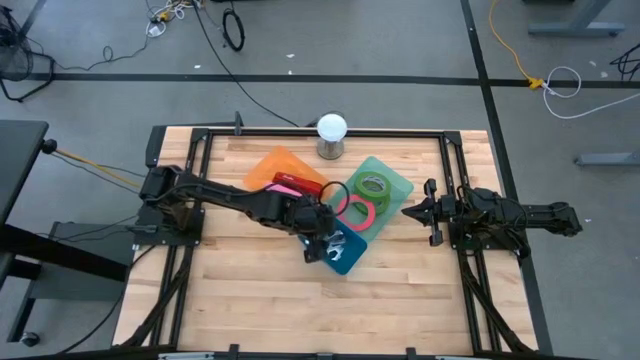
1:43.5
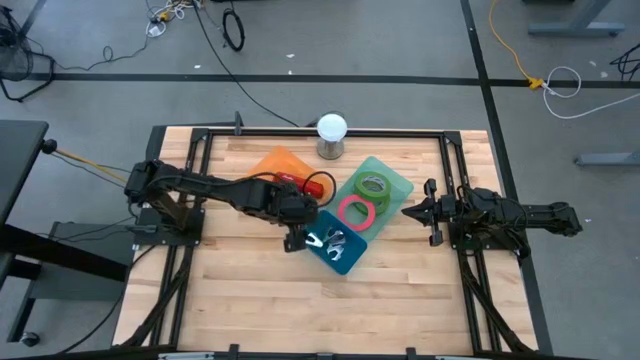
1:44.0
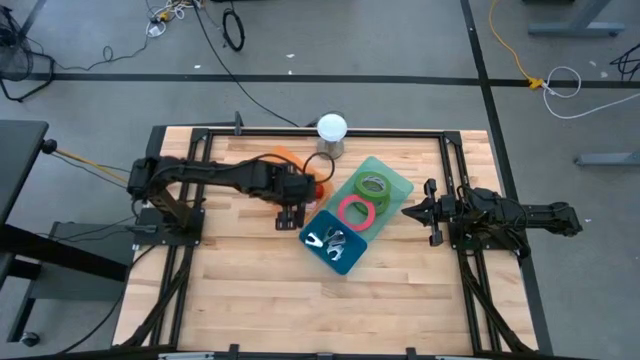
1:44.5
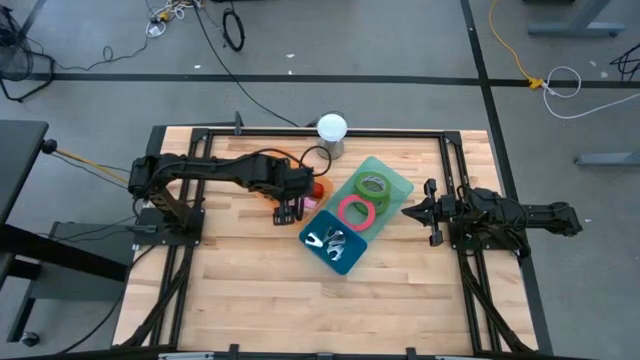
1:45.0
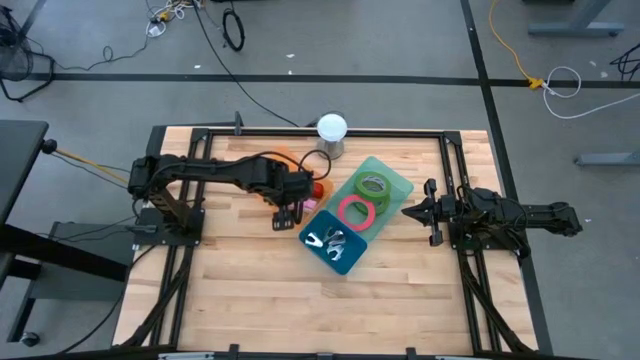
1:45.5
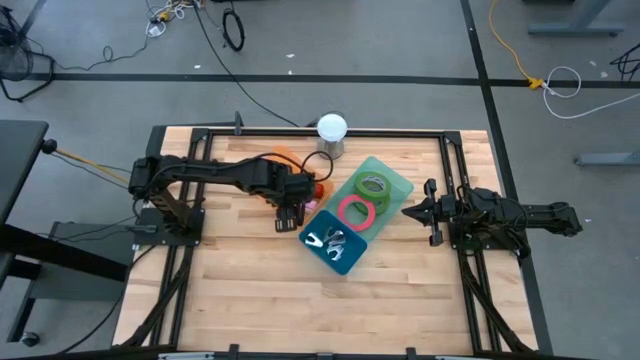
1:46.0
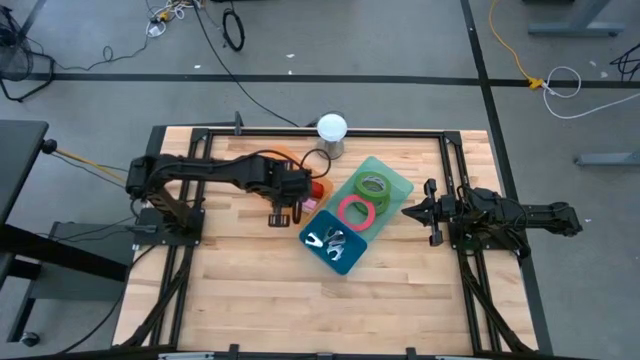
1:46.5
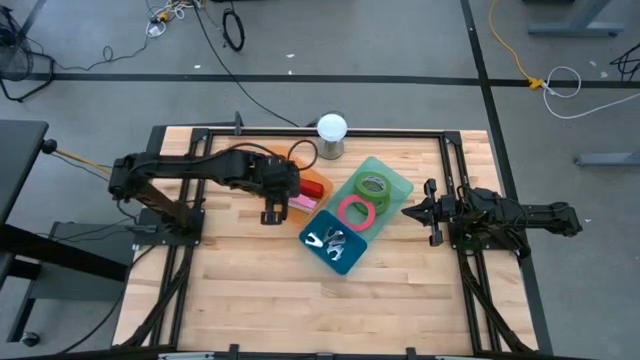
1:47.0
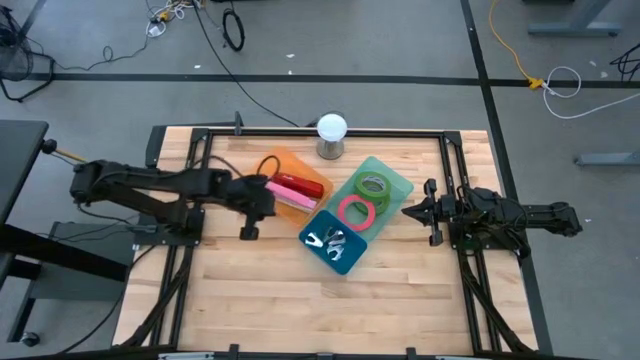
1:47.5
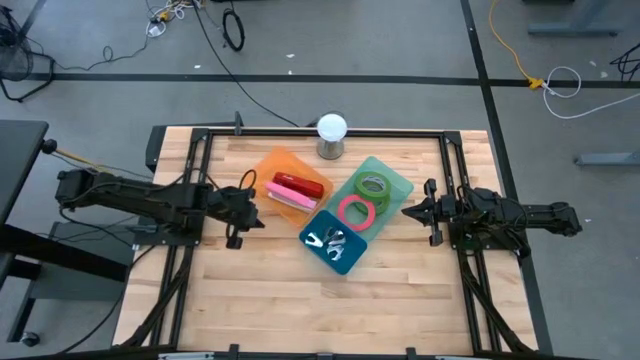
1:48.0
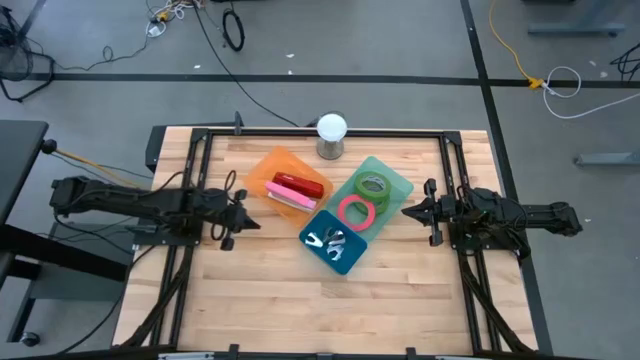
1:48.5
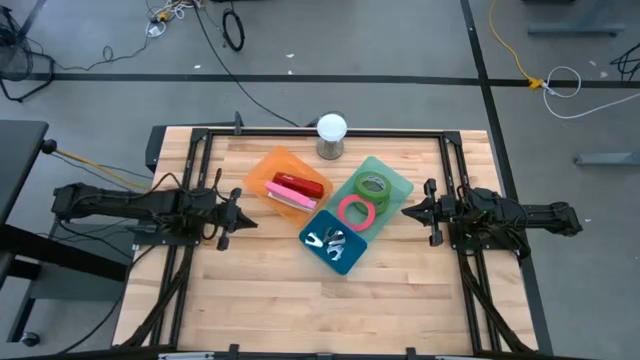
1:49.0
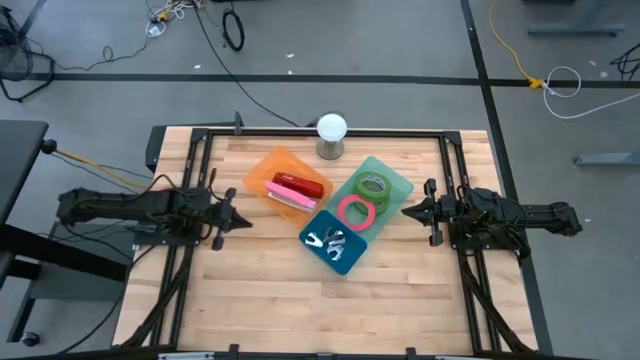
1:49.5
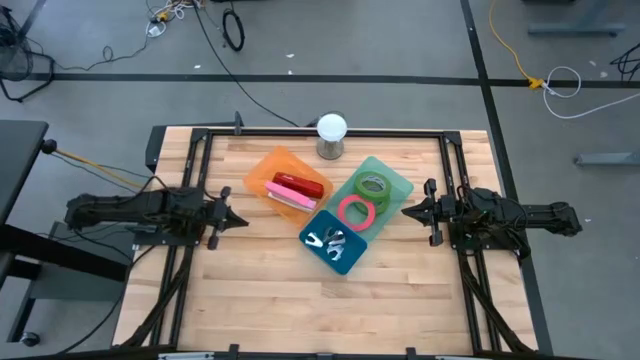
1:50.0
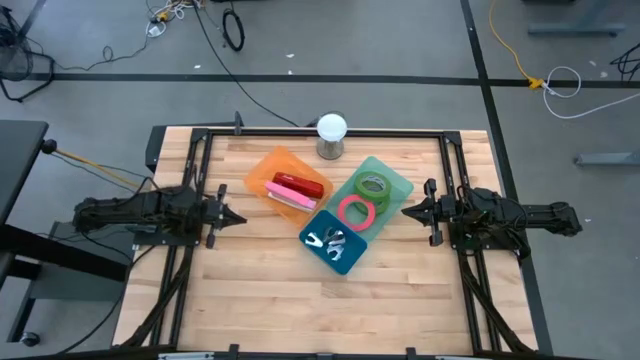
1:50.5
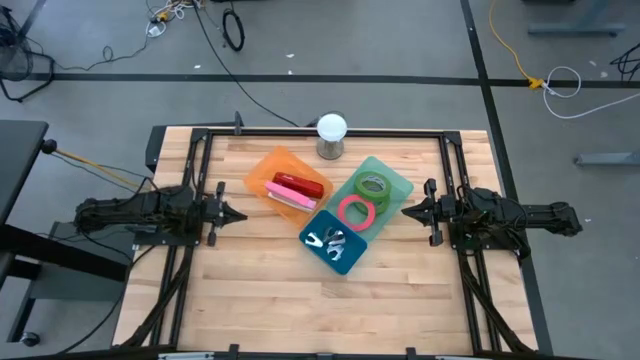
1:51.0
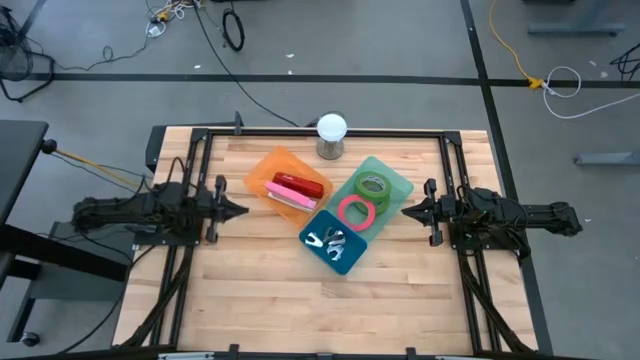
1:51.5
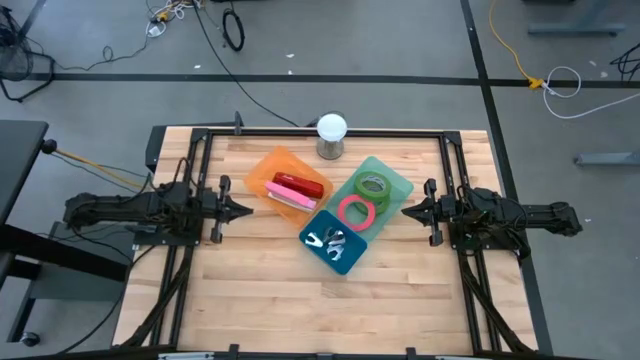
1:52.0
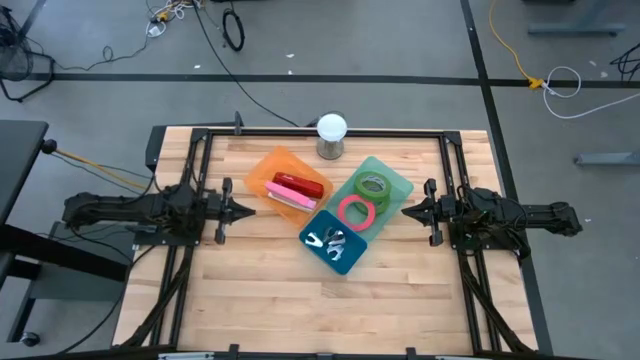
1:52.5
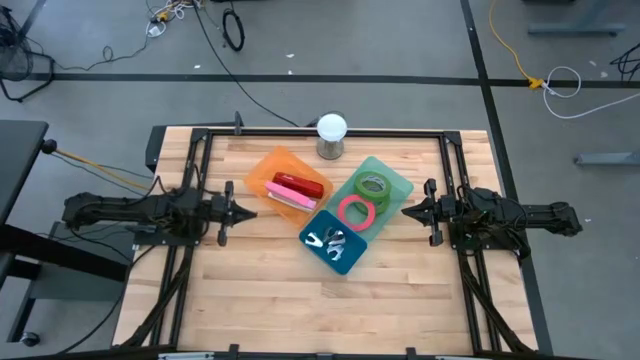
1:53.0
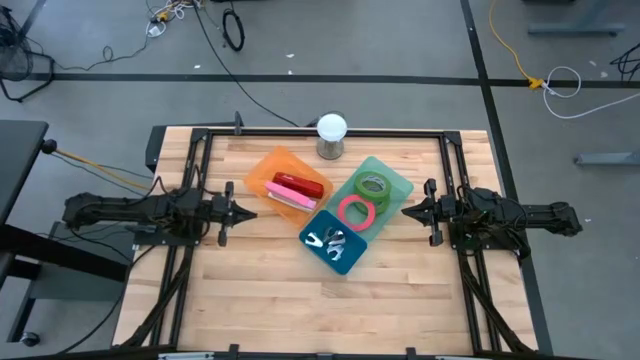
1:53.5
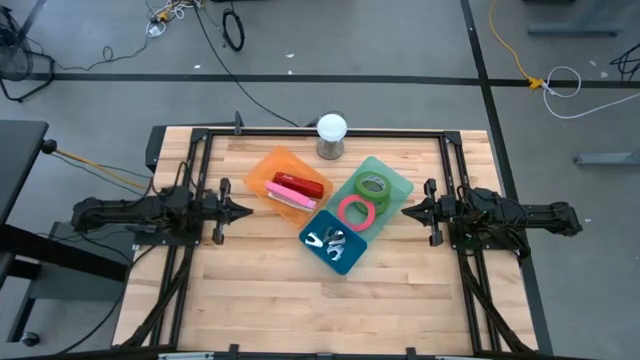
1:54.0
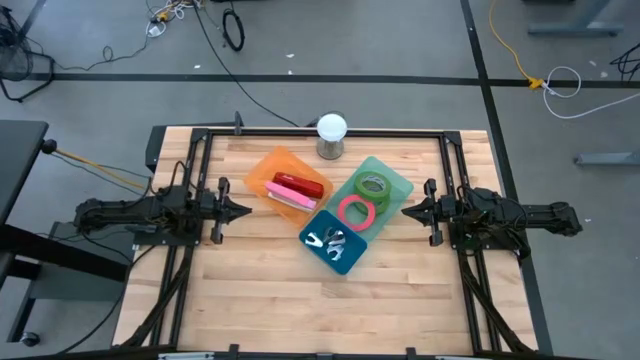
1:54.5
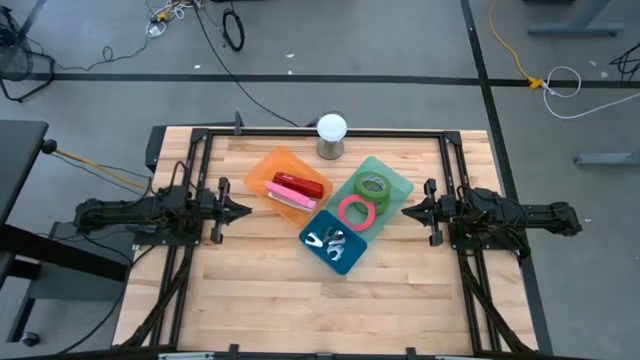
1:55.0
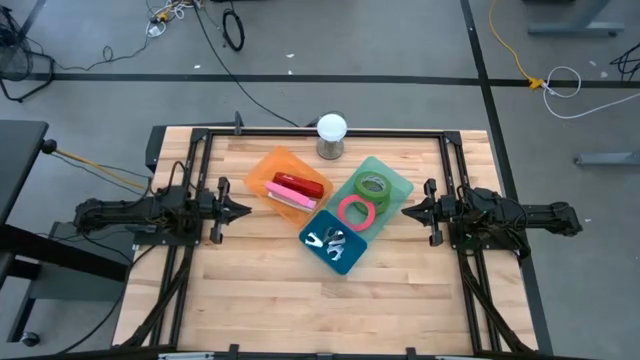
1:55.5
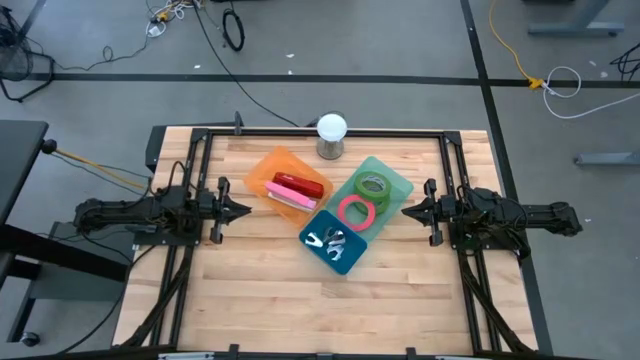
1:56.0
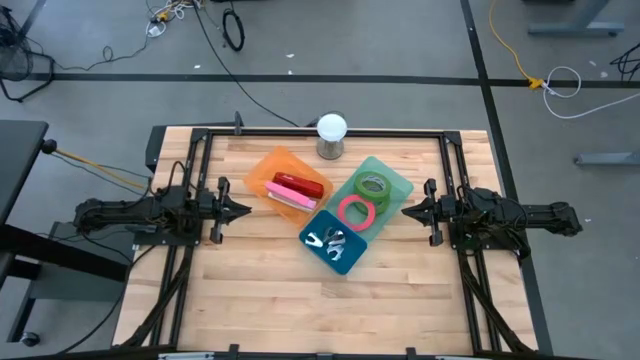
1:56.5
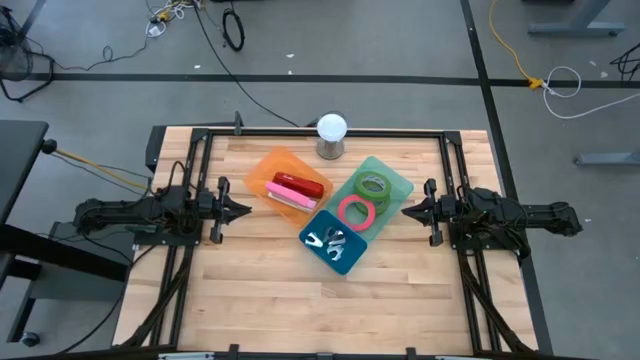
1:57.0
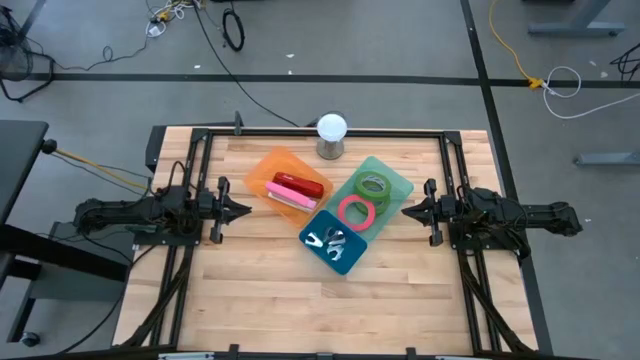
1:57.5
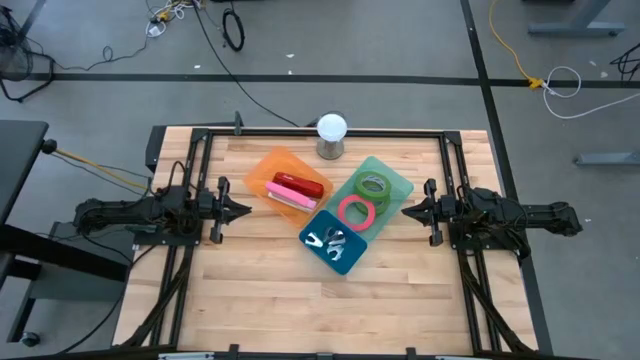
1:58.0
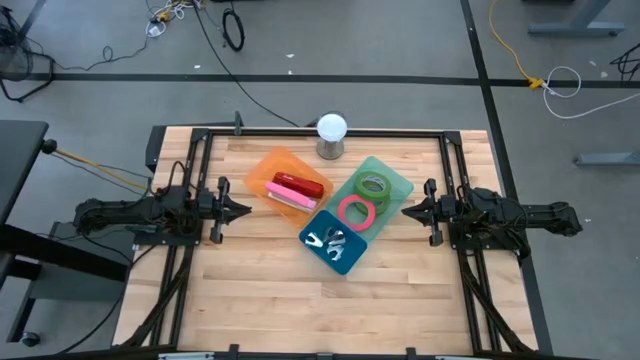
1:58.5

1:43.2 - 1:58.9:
Task: Pick and place Stapler, Stapler remover, tape
Return to Home Position

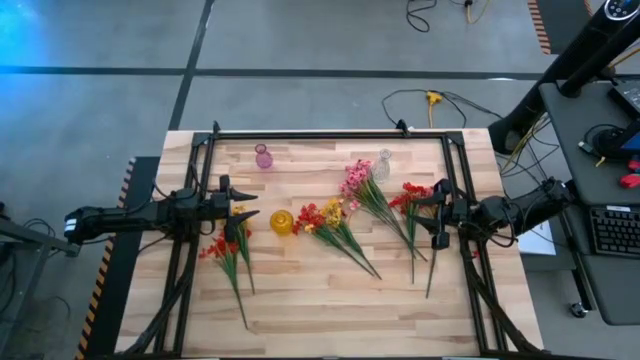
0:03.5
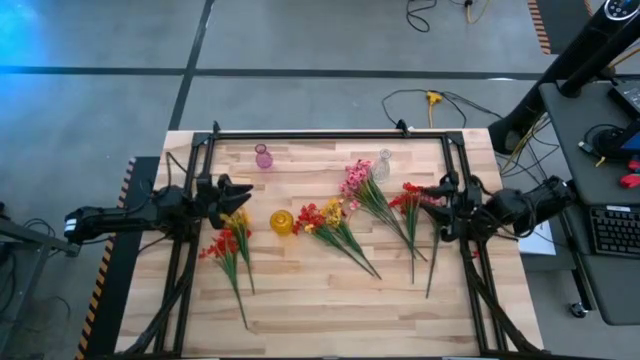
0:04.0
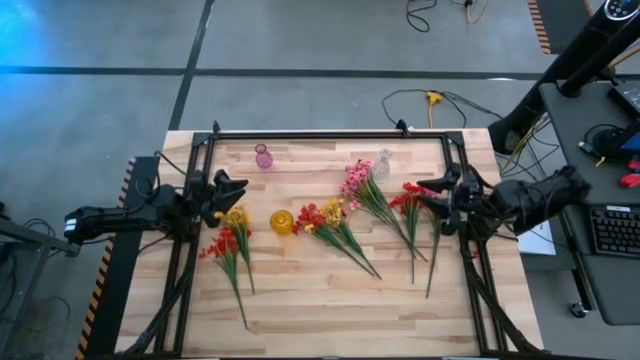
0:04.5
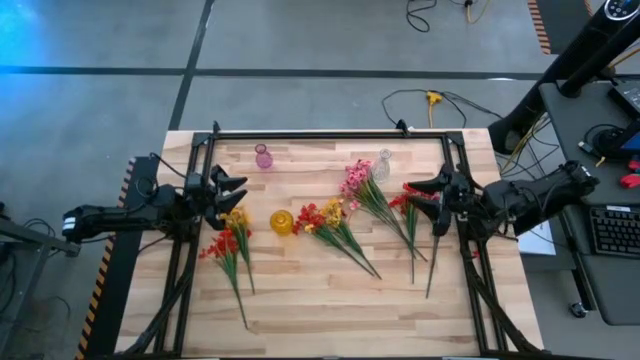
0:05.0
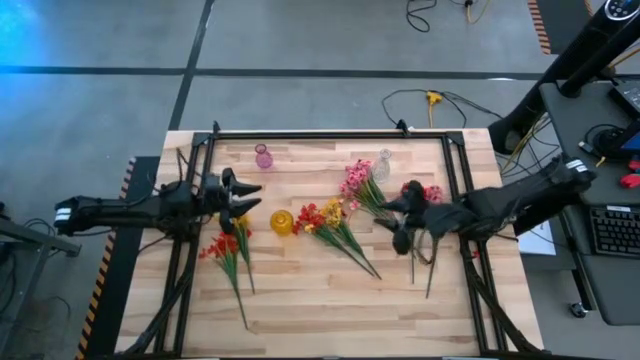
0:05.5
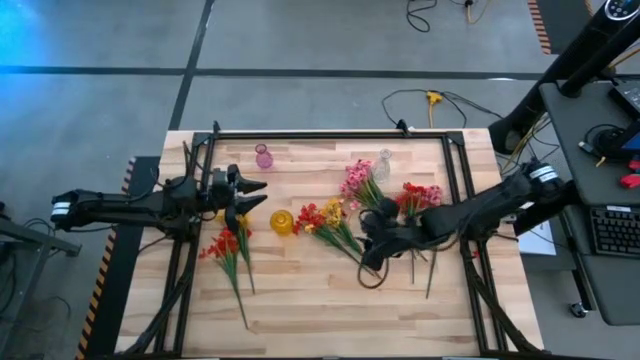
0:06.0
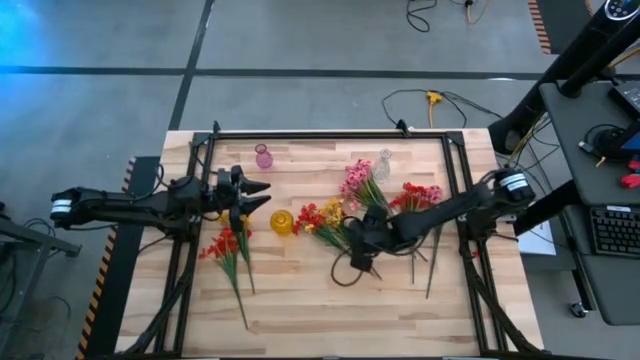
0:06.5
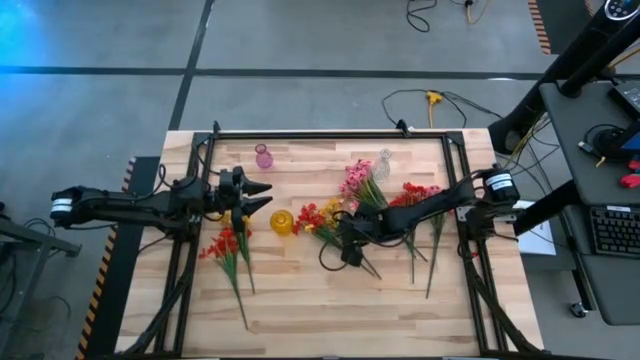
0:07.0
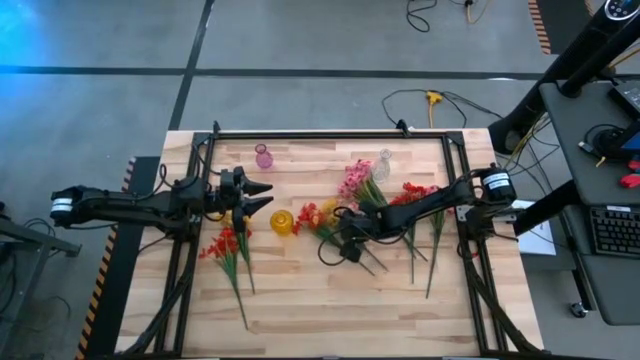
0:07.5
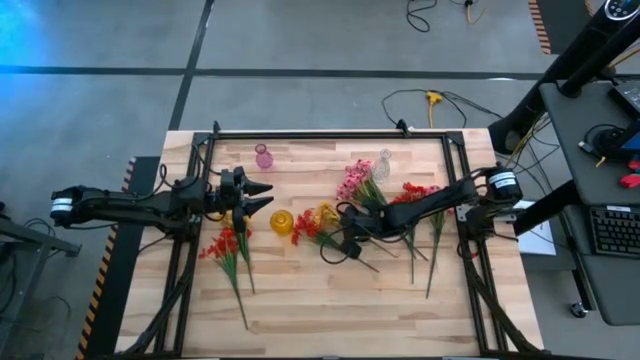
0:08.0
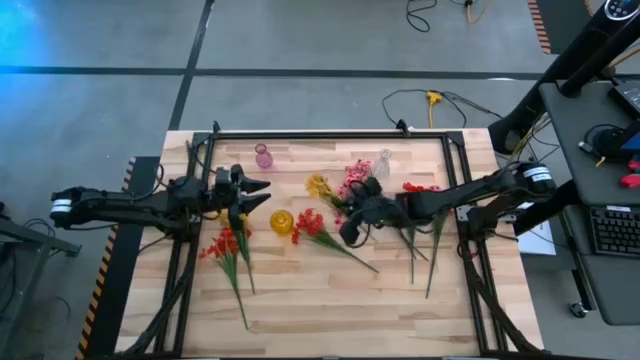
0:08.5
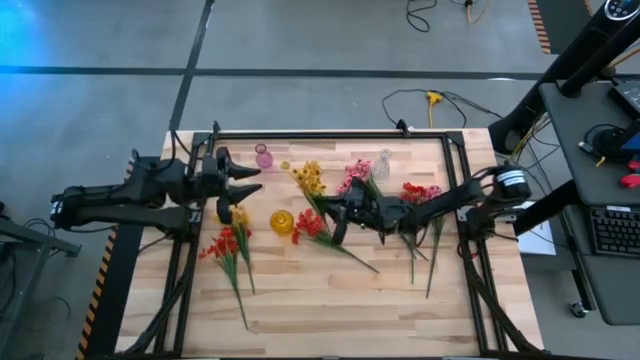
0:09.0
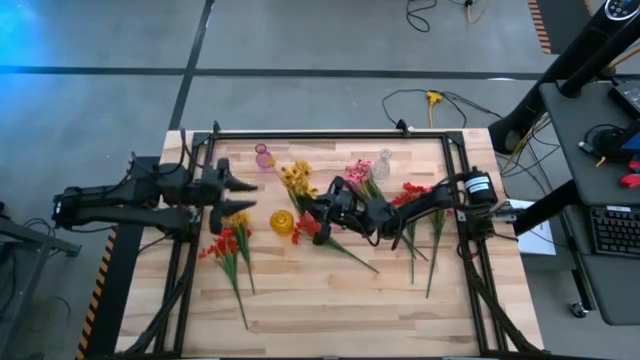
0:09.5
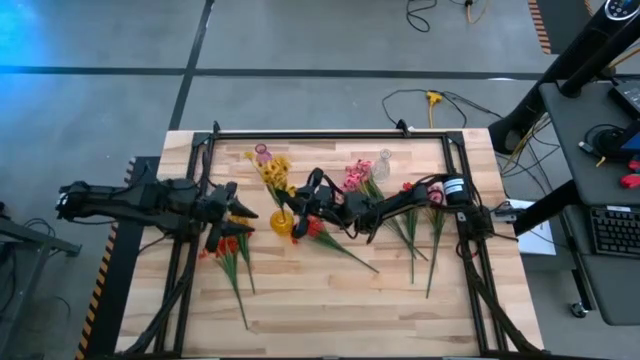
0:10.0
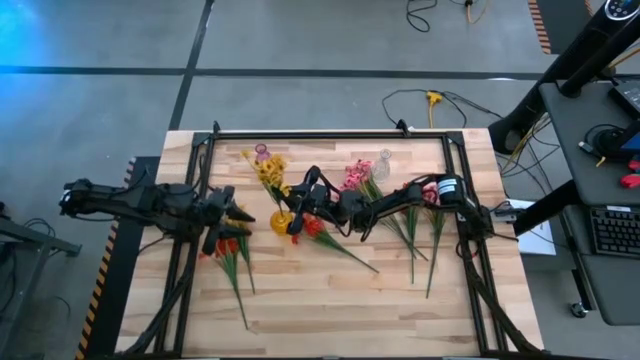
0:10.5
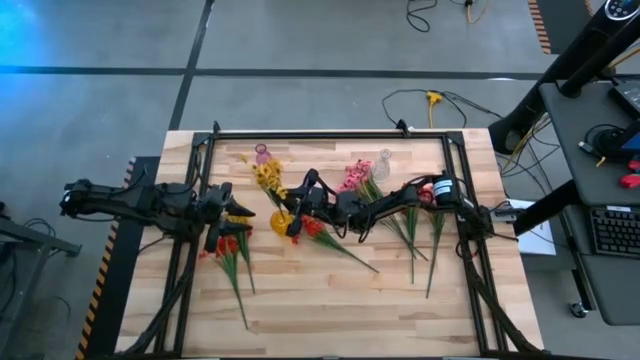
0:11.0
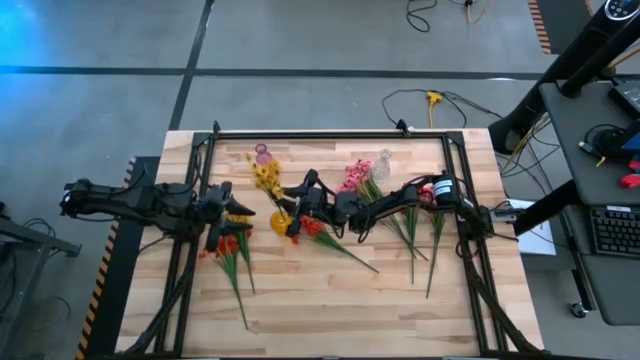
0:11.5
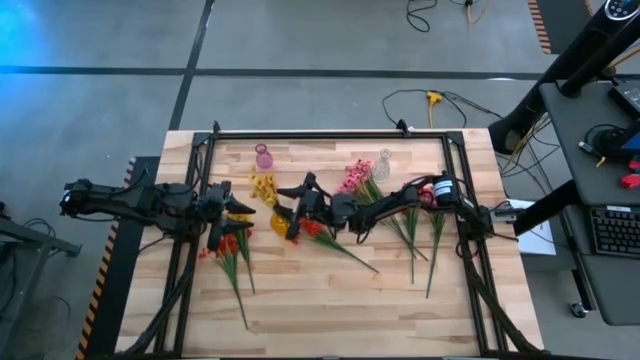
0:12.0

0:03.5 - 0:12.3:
Task: Sort flowers into vase by color
Put the right yellow flower into the yellow flower vase
